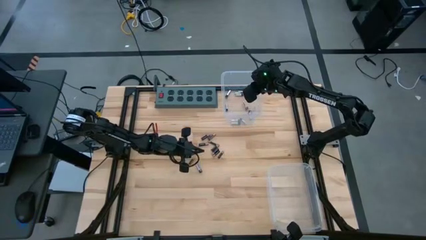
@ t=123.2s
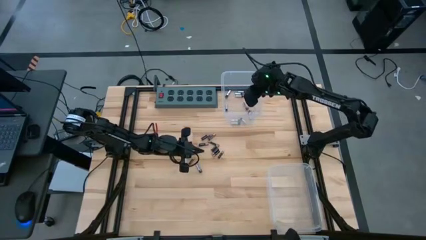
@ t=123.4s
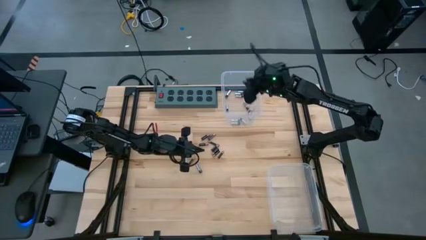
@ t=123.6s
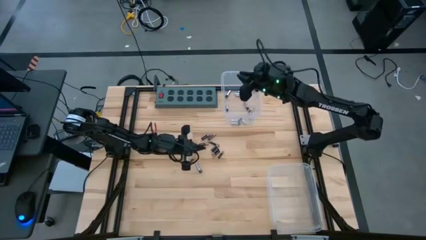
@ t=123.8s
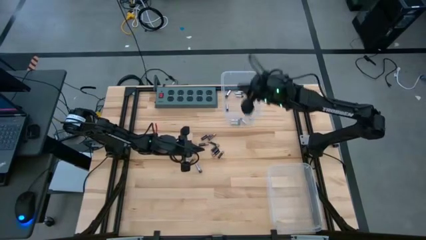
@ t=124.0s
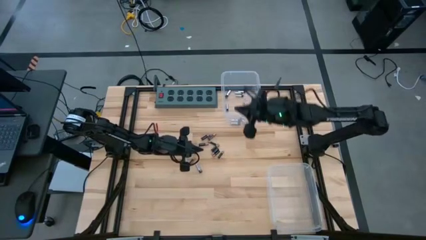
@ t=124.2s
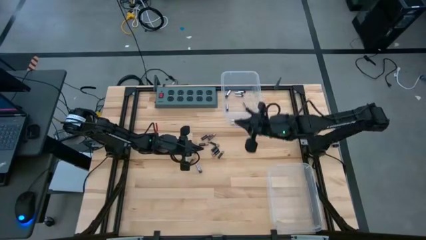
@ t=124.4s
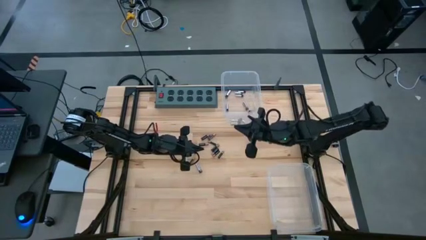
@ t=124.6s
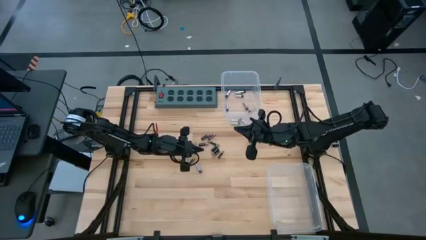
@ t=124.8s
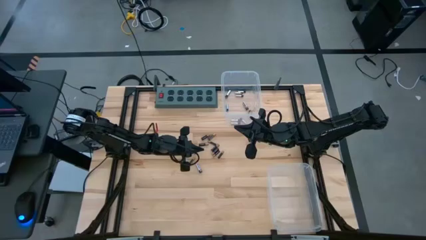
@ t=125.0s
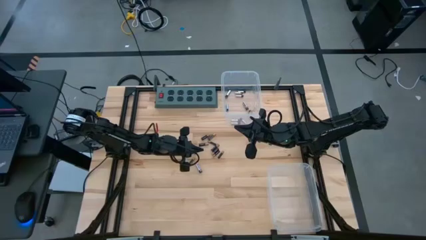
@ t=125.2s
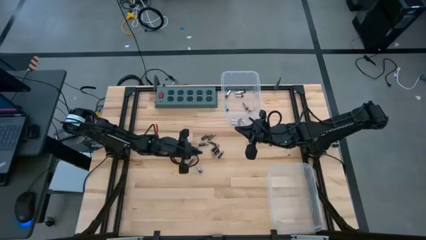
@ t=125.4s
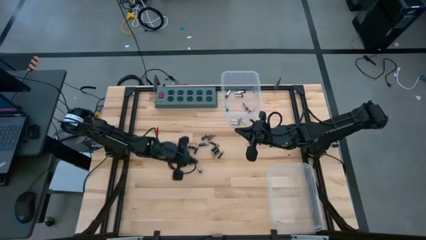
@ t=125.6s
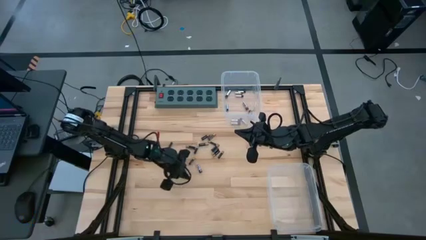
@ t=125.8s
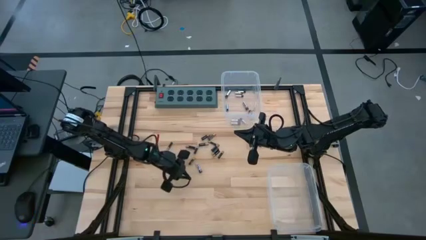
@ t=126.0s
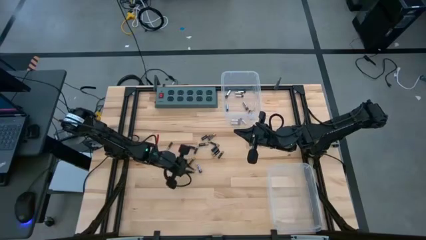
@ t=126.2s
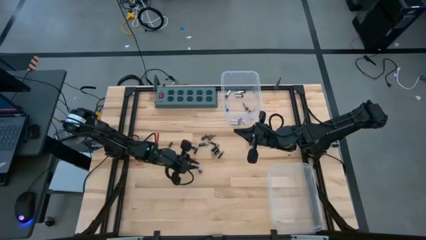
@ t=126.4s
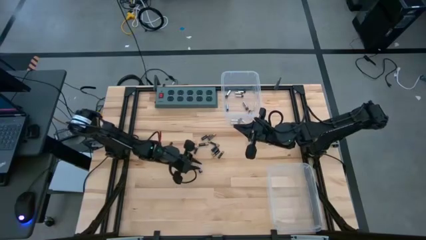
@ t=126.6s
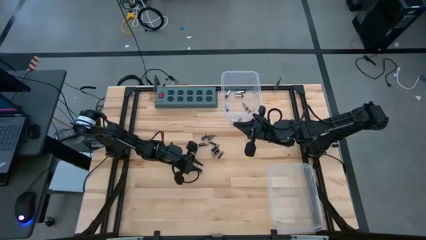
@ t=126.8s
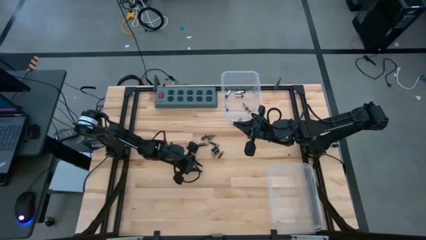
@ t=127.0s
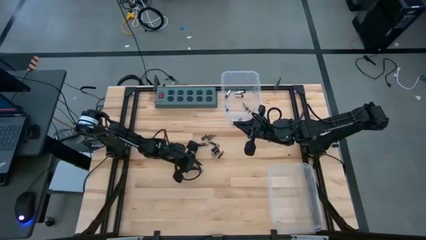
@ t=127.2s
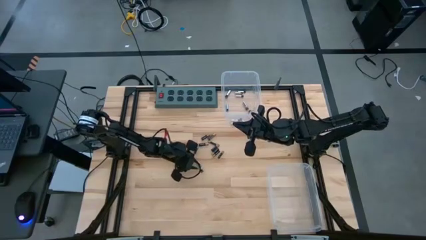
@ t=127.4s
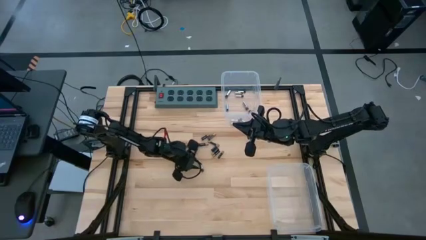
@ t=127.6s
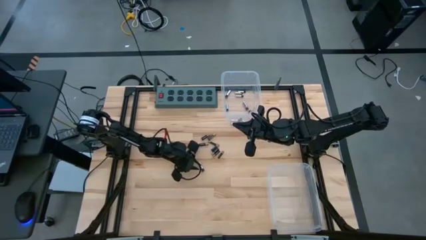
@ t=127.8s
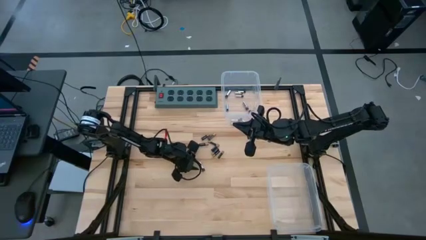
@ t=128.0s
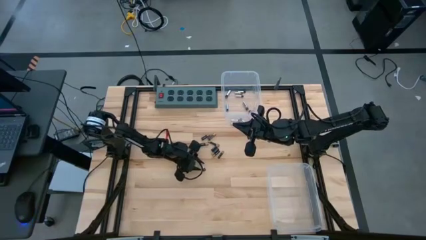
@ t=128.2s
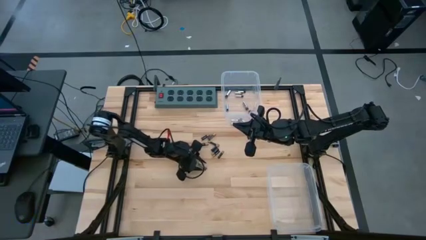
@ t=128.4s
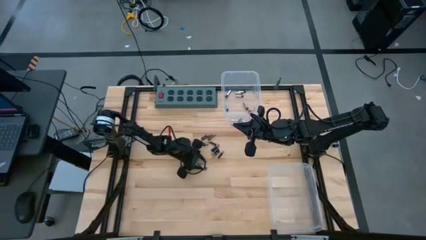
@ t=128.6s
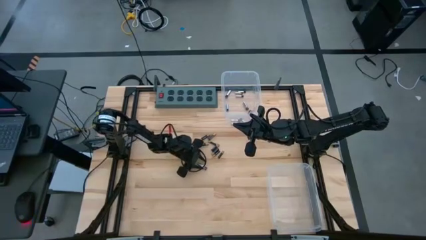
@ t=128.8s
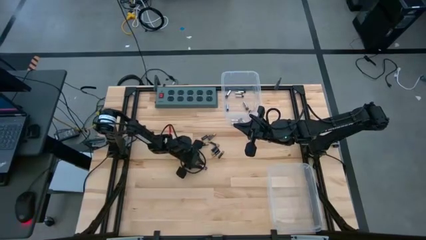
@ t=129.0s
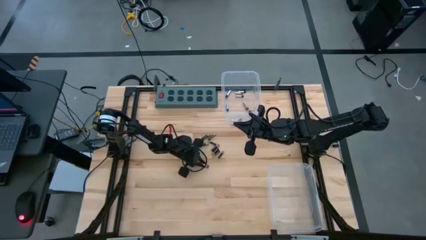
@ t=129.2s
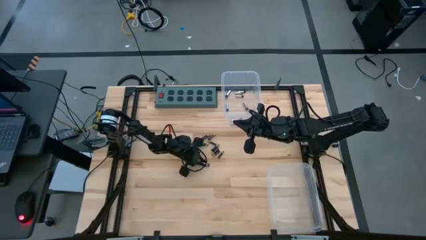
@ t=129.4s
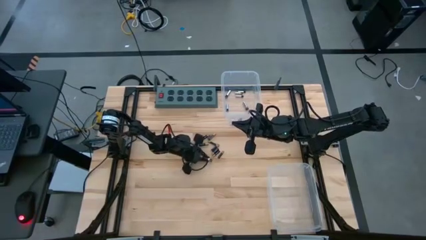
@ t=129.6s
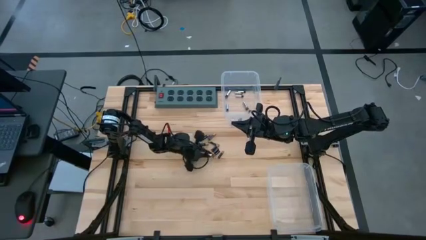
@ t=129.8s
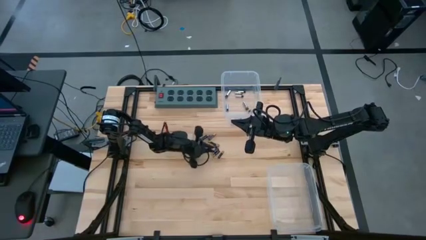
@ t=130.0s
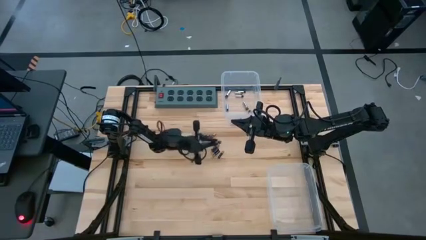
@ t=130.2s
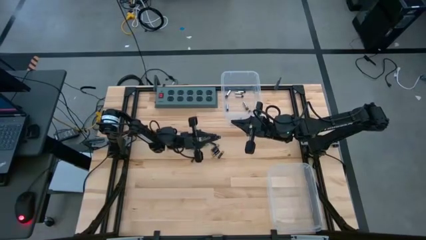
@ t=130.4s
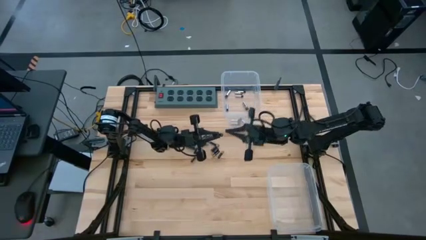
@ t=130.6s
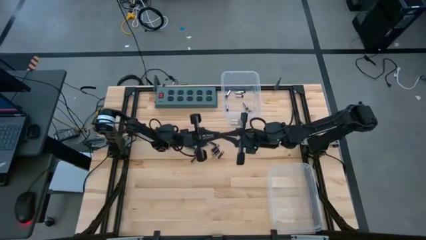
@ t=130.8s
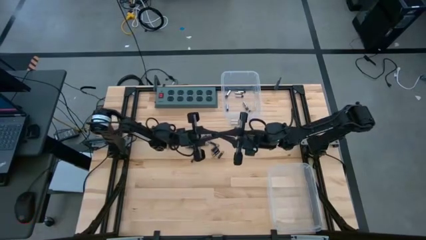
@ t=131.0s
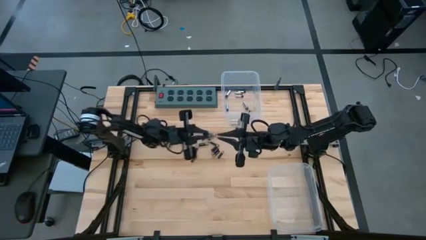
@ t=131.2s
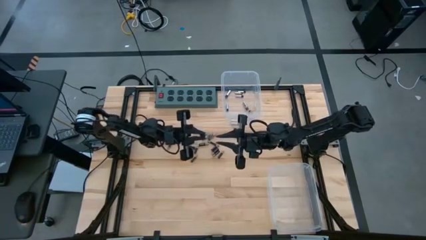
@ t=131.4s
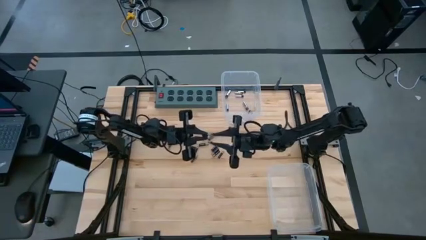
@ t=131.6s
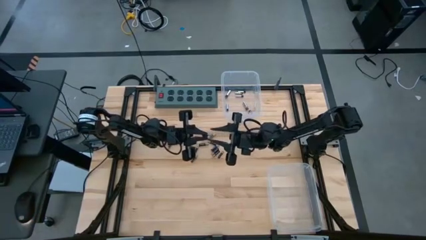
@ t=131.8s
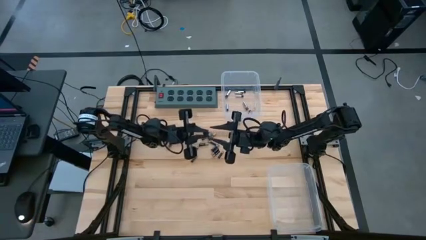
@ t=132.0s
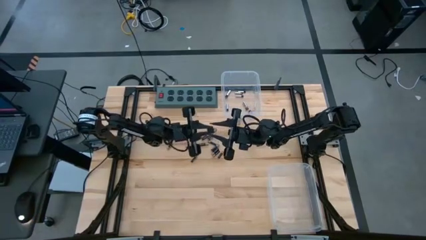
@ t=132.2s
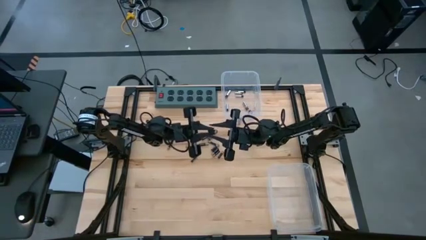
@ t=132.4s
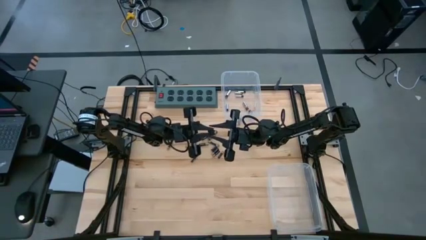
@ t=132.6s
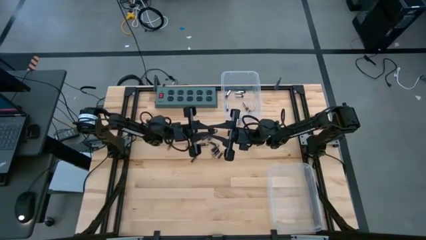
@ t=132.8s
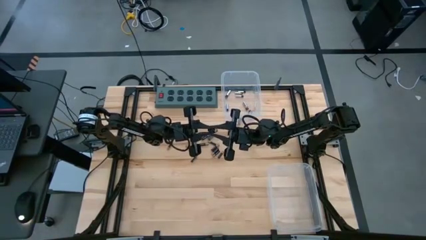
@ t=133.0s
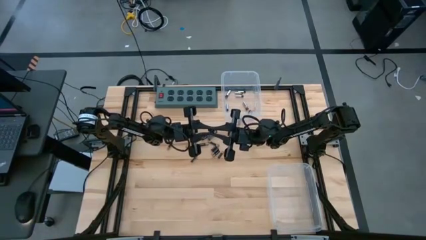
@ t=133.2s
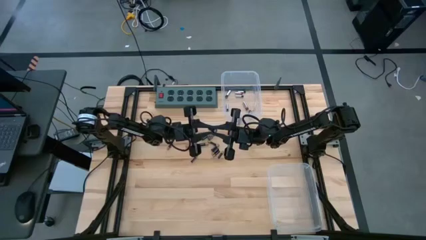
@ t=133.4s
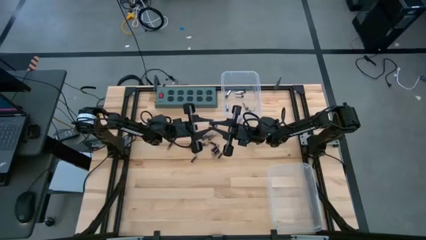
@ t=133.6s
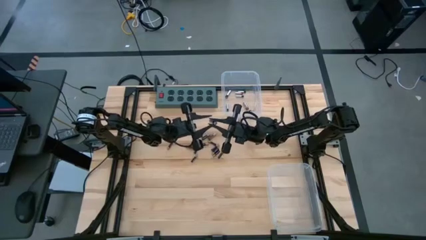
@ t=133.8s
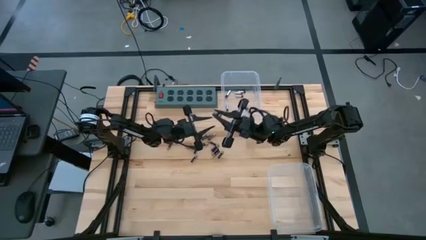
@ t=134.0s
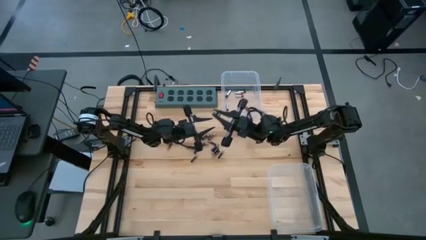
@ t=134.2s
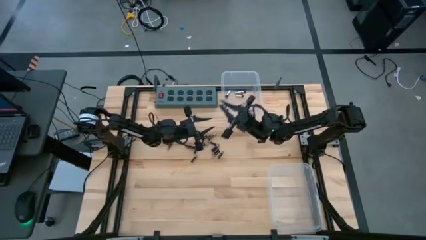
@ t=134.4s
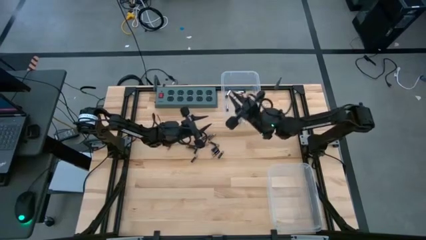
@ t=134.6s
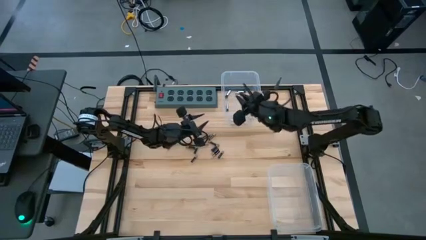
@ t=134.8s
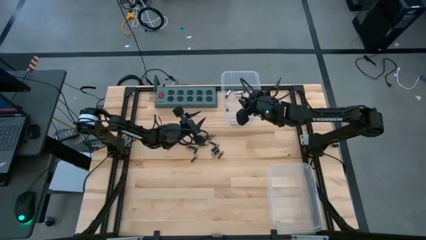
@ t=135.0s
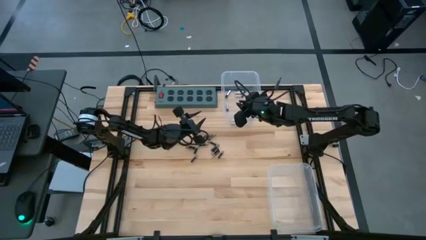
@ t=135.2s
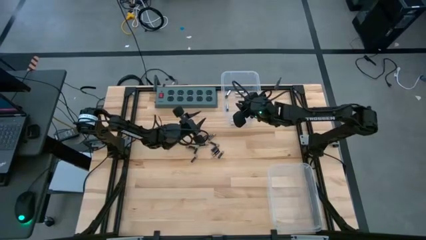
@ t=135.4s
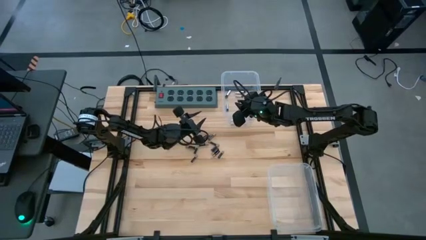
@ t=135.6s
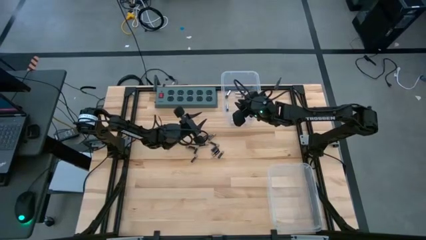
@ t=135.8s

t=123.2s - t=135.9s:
Task: Sort batteries
Put the silver battery into the top transparent bin

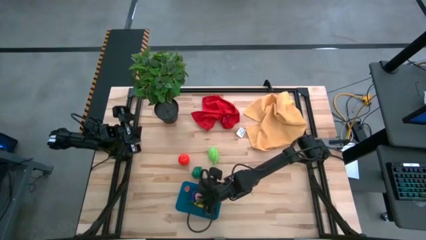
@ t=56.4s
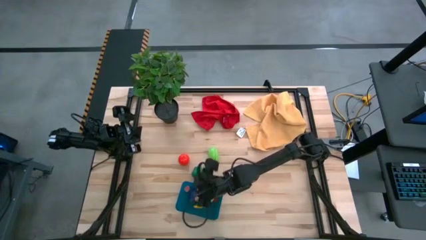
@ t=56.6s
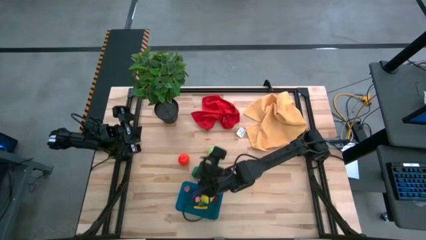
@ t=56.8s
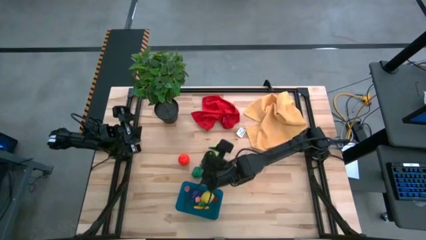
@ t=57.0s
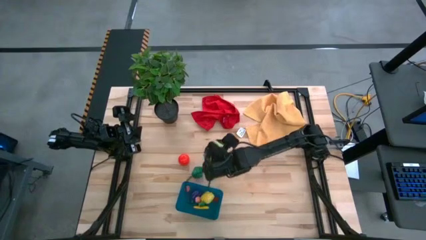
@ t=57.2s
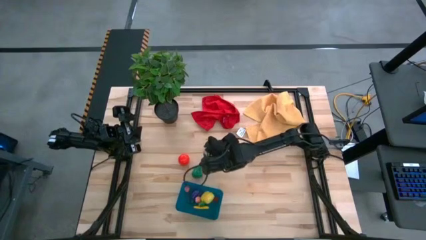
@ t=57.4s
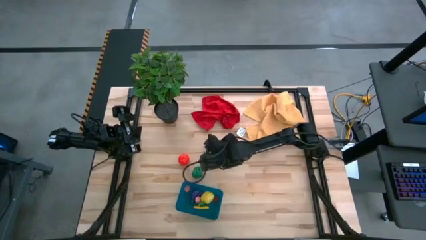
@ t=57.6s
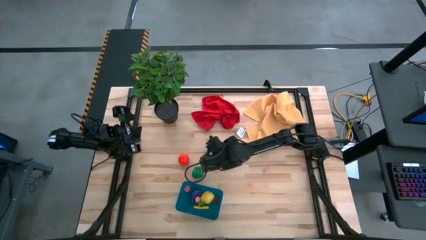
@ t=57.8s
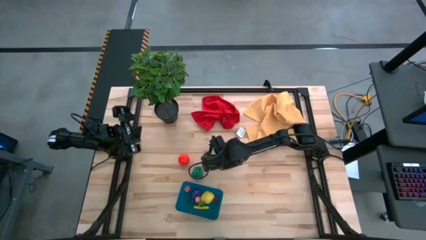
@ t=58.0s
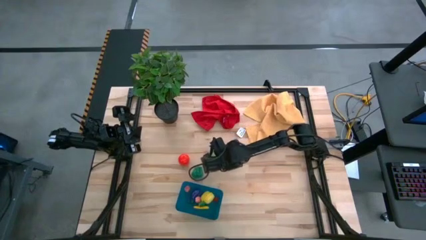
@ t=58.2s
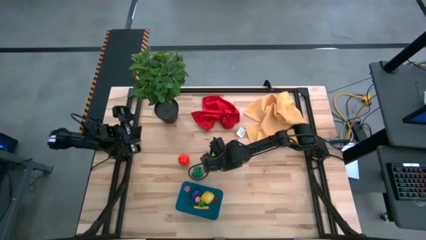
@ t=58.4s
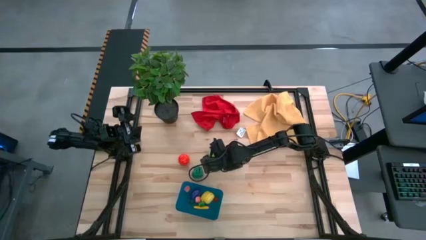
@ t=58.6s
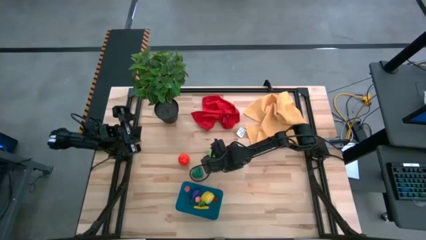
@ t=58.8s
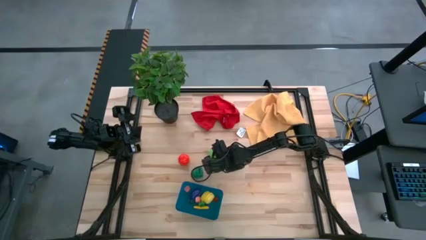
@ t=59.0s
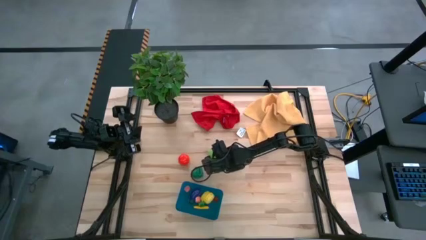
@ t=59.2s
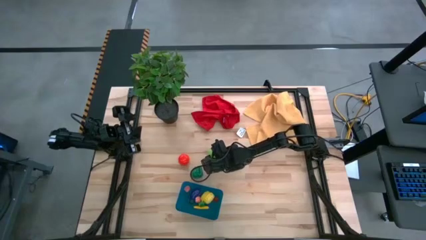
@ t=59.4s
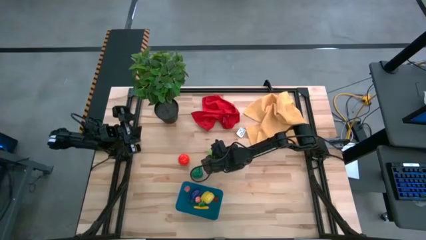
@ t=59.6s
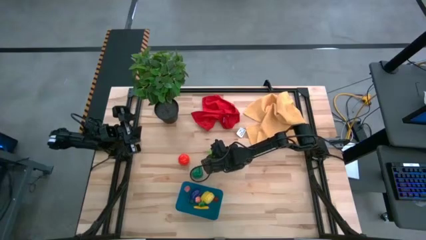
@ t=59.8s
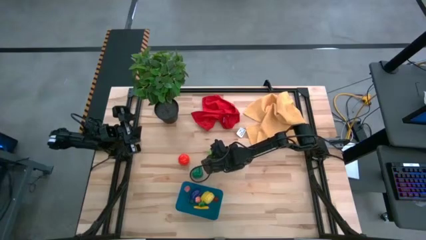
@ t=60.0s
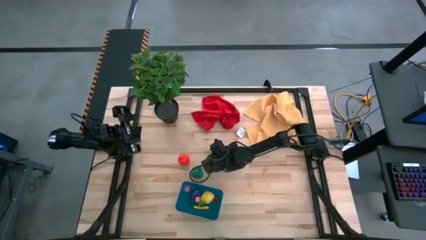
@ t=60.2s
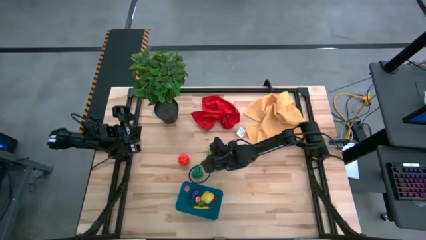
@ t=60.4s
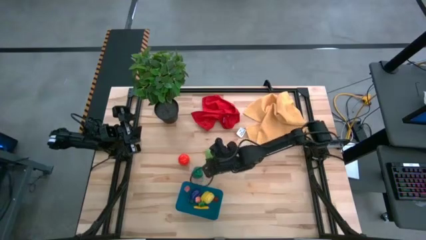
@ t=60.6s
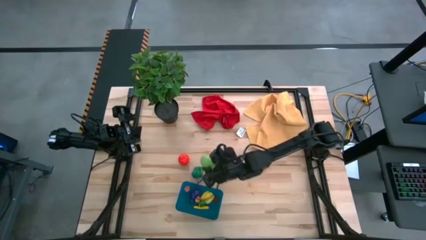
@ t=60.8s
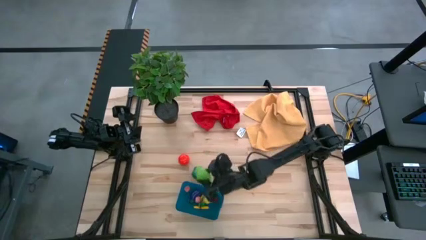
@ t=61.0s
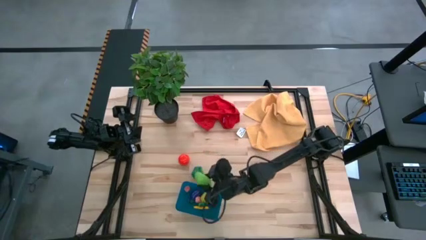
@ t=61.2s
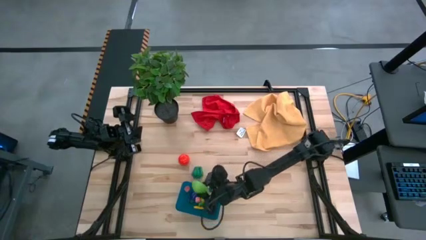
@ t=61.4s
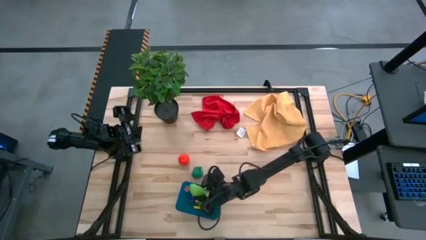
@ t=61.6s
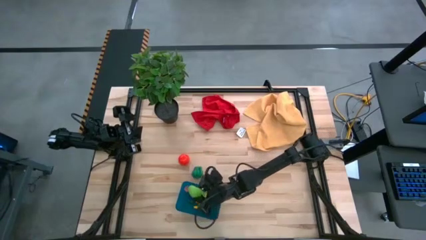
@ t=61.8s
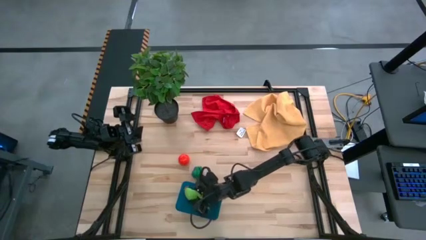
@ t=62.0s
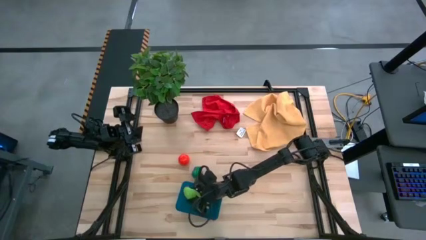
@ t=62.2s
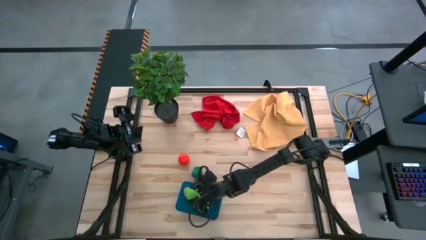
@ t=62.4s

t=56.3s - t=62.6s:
Task: Pick and placing Produce into tupperware
Put the cabbage into the blue basket
